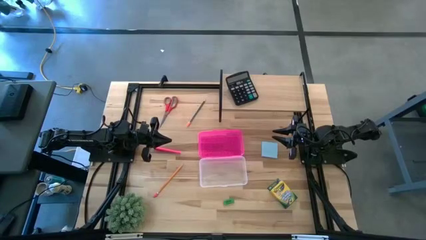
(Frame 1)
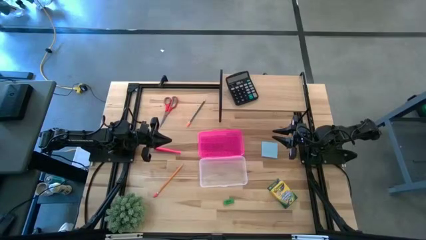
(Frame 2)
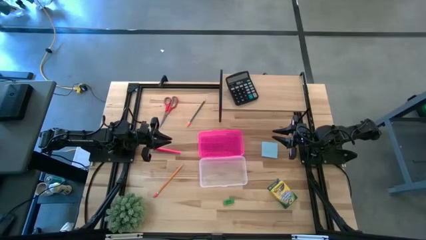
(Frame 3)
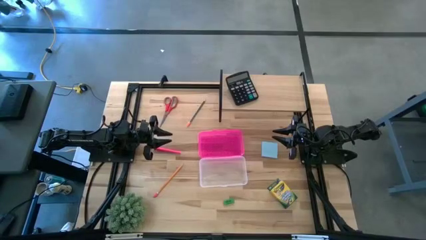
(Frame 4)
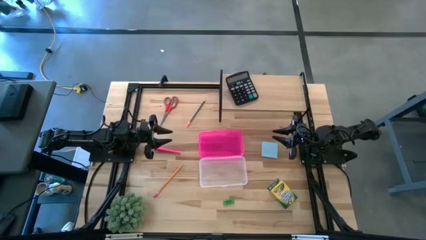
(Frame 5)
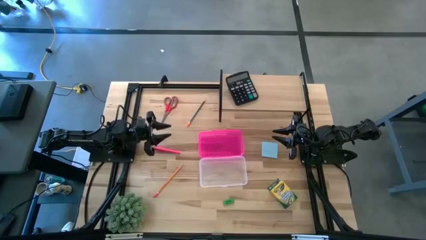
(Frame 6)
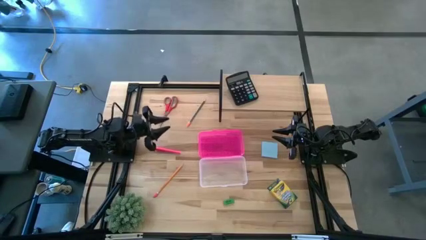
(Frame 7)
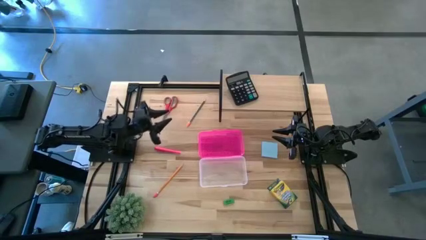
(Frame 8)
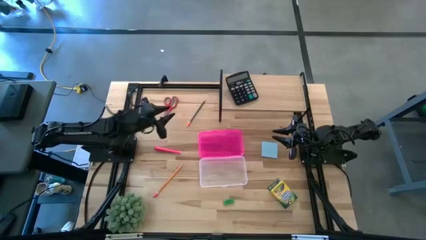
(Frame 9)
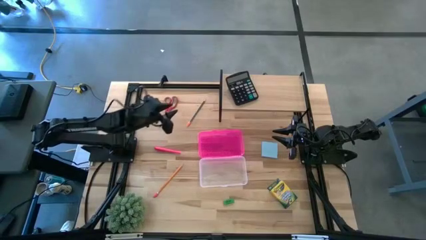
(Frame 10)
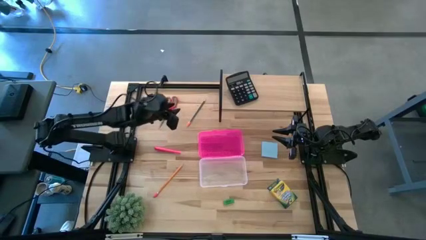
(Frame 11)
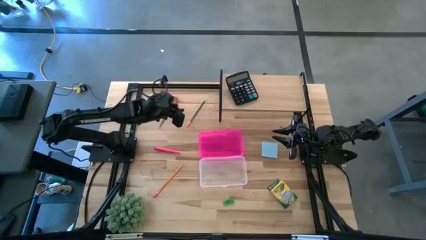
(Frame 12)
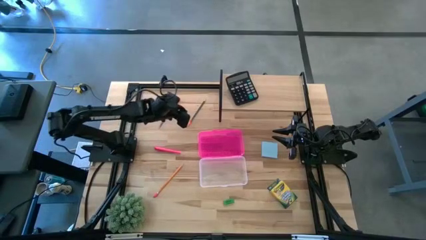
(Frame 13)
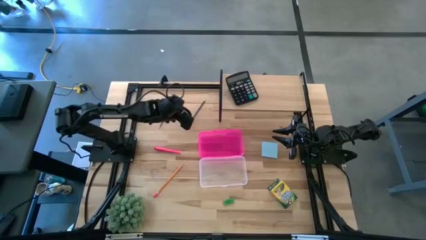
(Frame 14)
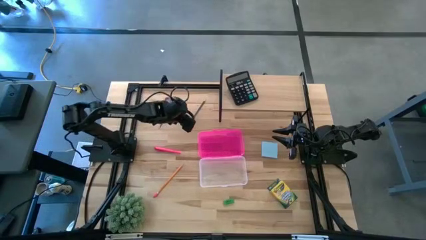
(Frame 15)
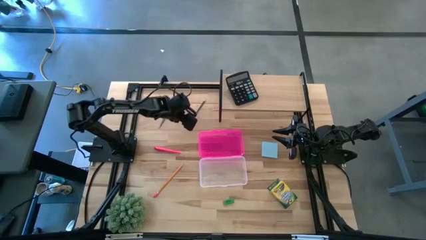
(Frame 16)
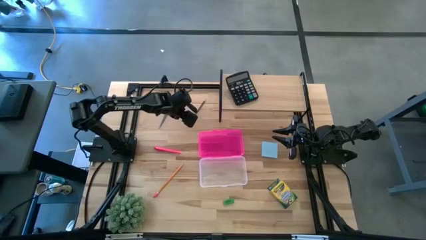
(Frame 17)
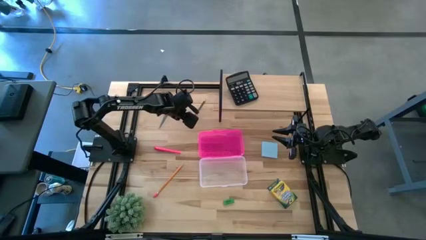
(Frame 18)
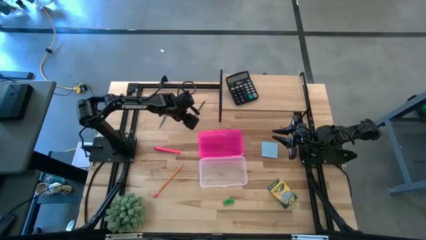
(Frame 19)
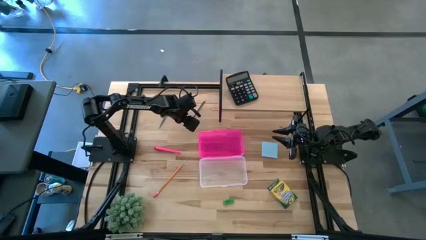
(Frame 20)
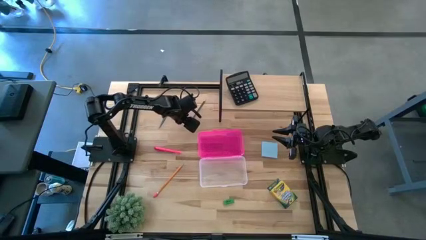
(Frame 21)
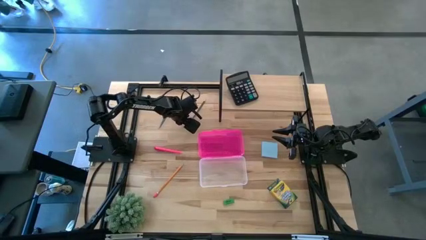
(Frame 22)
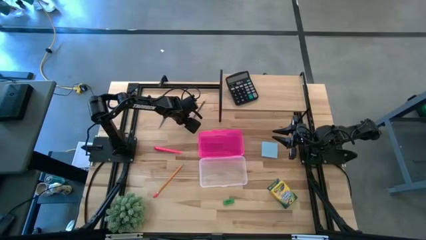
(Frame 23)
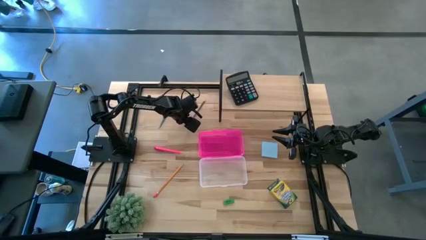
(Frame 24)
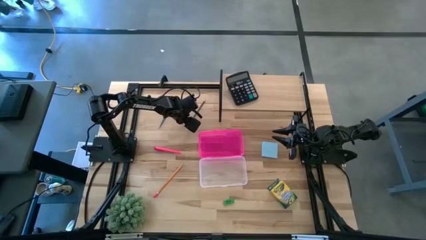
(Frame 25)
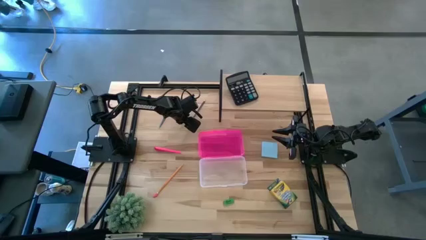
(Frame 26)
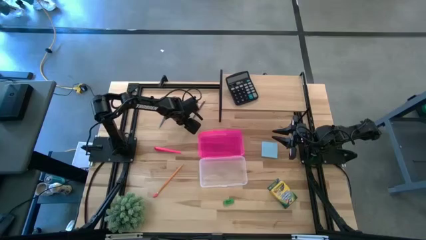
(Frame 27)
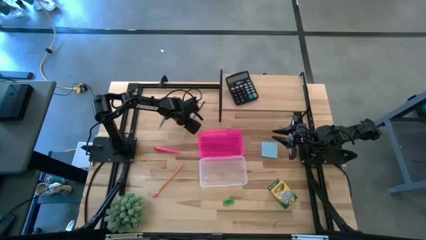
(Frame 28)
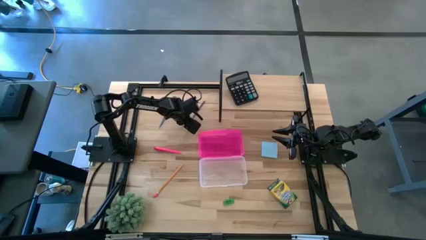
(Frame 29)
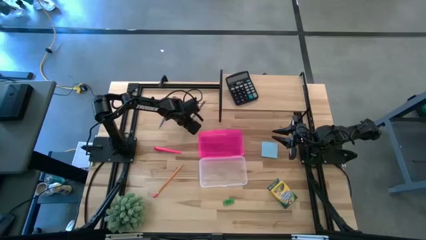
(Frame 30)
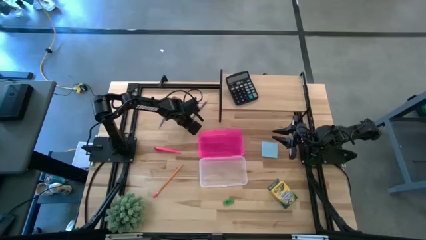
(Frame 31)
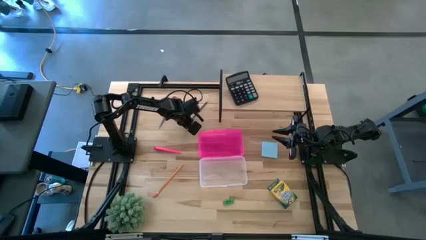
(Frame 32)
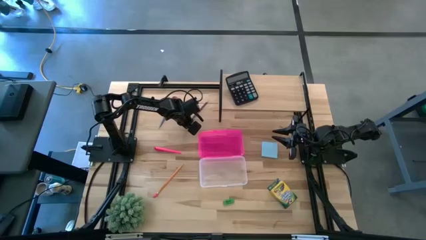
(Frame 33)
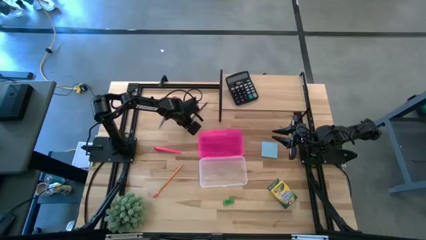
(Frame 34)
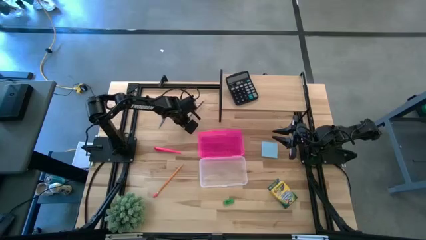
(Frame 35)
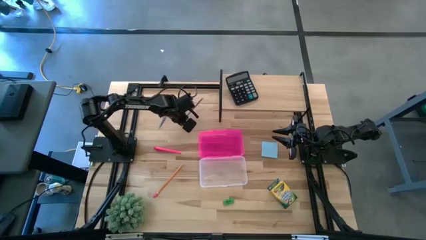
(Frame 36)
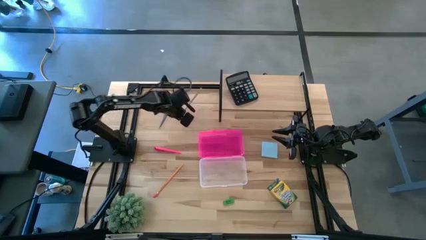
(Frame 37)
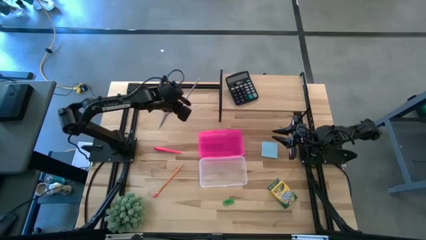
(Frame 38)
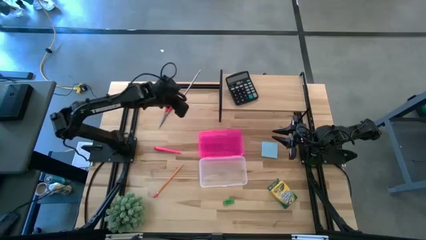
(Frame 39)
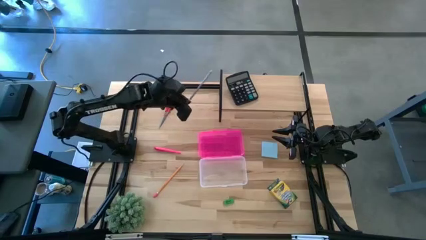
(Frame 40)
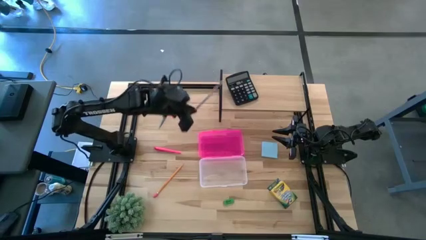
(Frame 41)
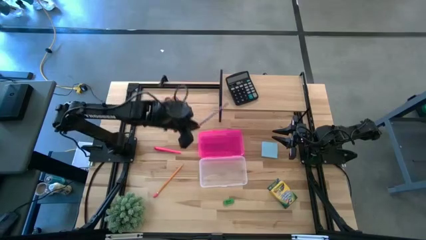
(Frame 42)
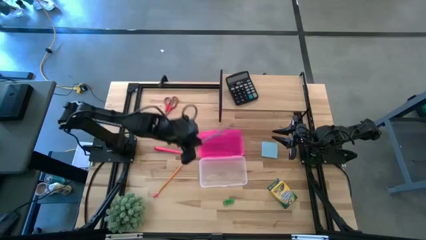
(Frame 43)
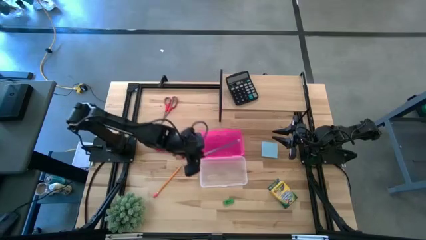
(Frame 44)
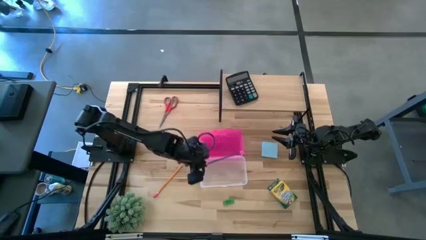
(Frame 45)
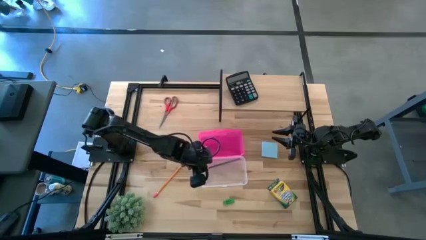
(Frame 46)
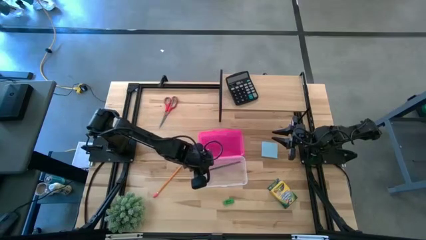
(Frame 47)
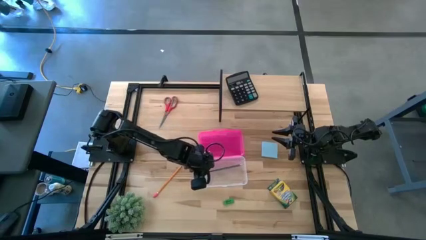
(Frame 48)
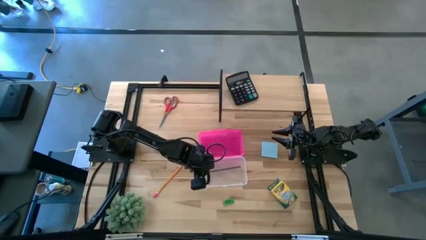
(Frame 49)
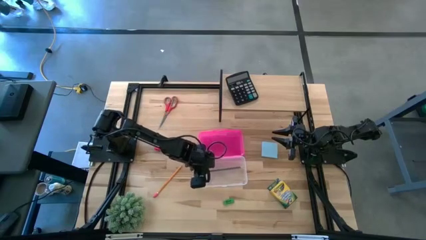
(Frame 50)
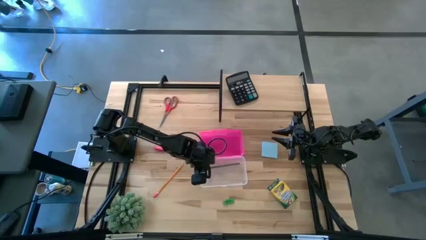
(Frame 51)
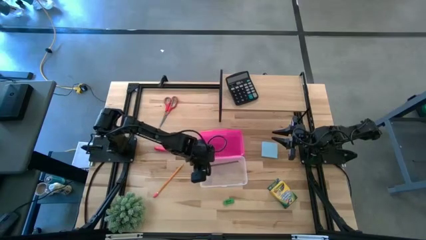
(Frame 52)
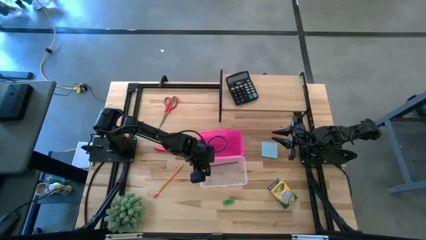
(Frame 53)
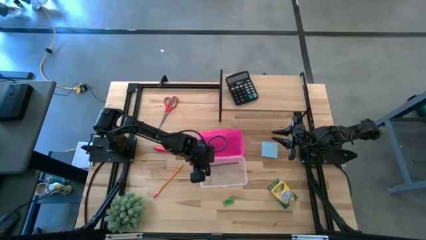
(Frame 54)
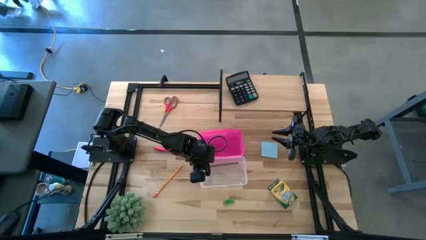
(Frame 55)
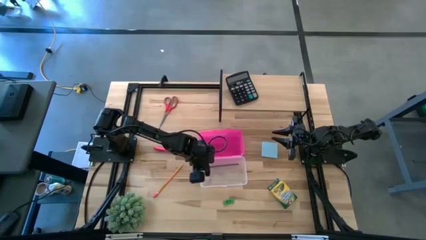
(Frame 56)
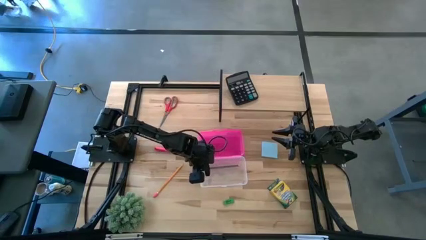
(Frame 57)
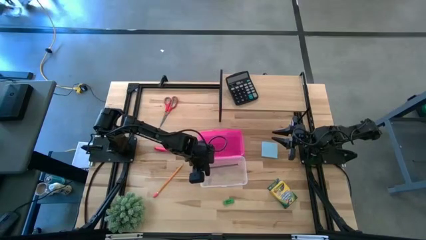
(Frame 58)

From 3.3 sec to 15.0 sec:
Task: Pack school essentials
Put the blue pencil into the transparent box
